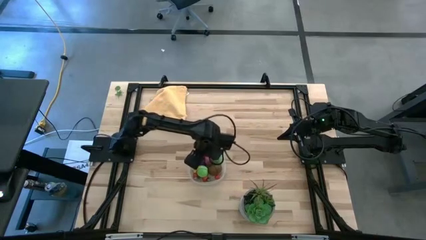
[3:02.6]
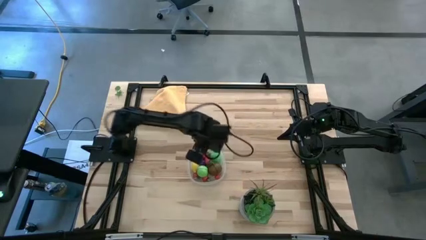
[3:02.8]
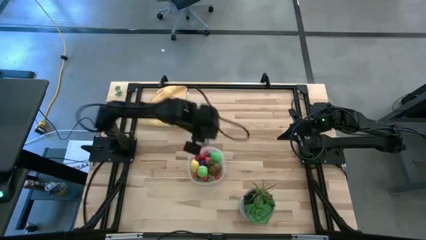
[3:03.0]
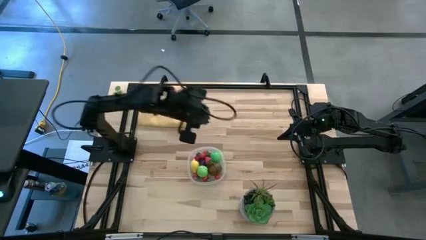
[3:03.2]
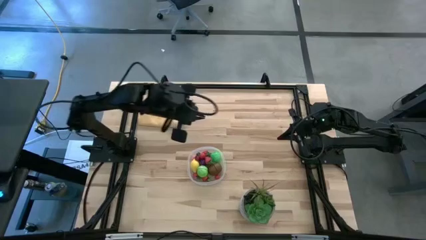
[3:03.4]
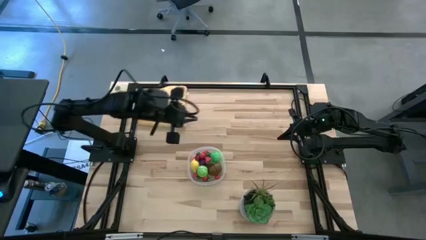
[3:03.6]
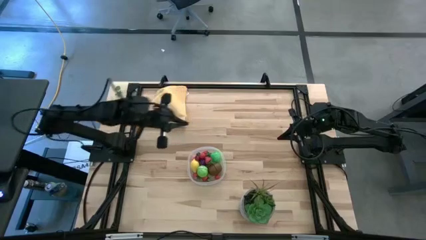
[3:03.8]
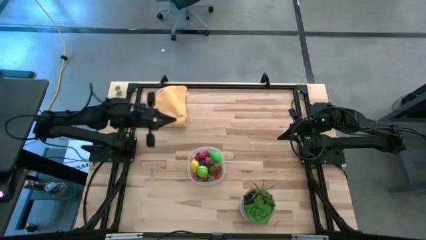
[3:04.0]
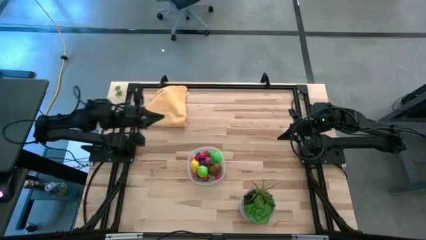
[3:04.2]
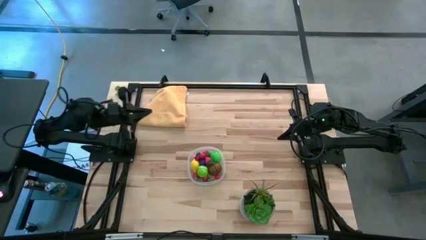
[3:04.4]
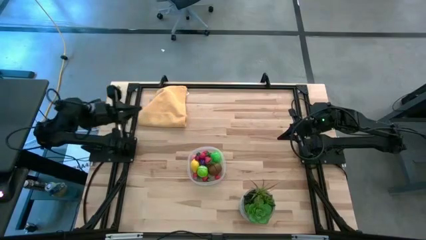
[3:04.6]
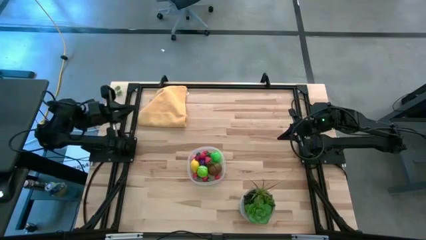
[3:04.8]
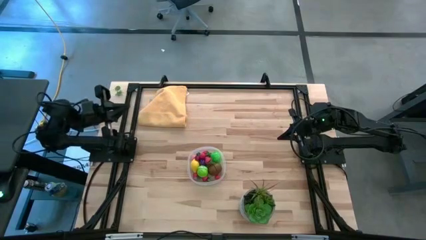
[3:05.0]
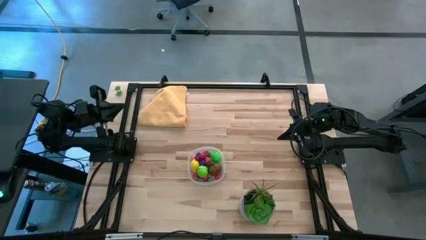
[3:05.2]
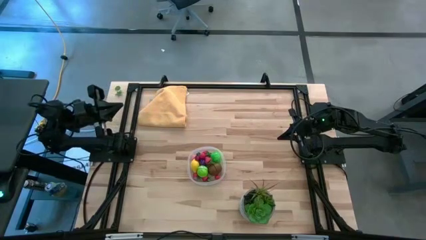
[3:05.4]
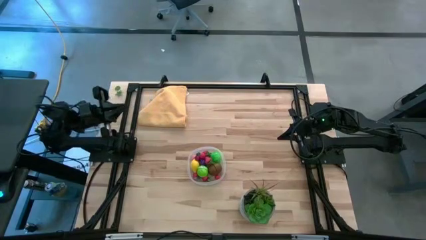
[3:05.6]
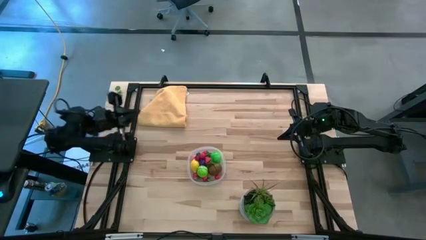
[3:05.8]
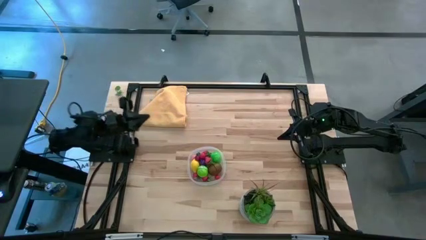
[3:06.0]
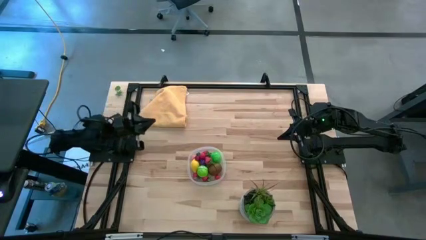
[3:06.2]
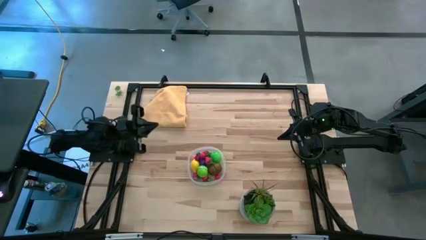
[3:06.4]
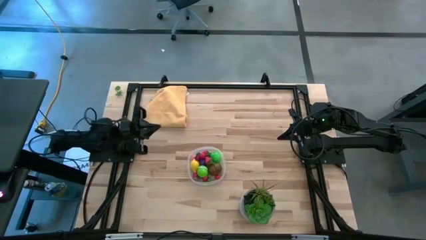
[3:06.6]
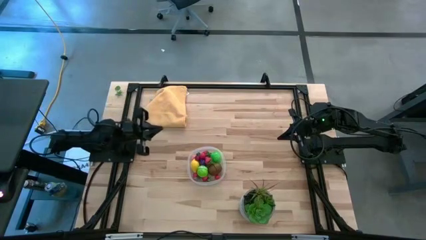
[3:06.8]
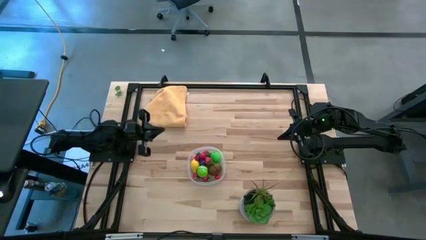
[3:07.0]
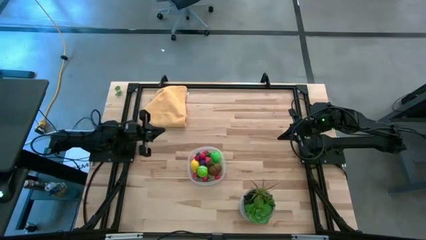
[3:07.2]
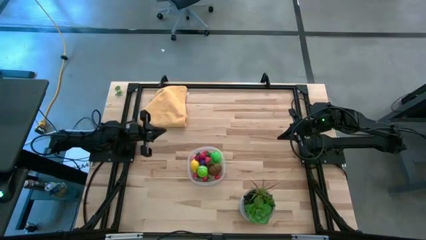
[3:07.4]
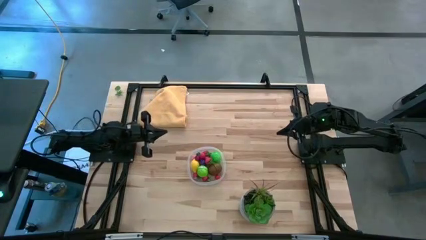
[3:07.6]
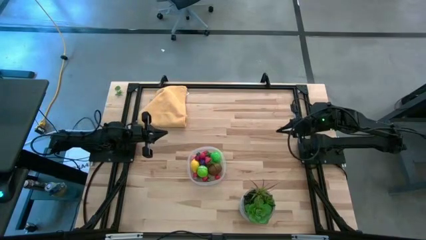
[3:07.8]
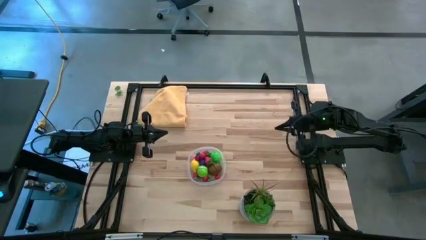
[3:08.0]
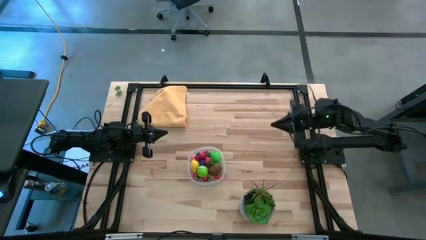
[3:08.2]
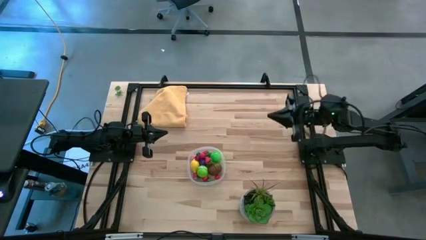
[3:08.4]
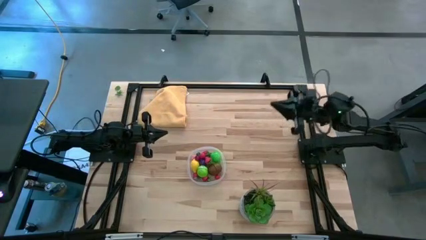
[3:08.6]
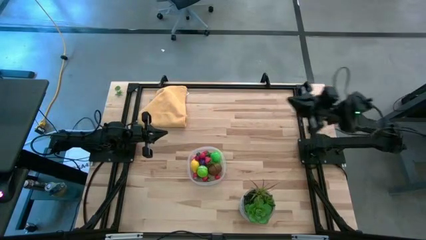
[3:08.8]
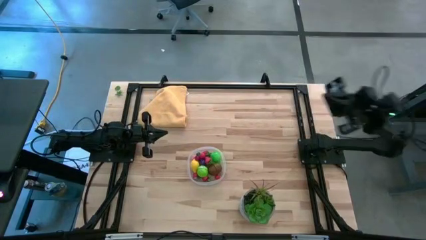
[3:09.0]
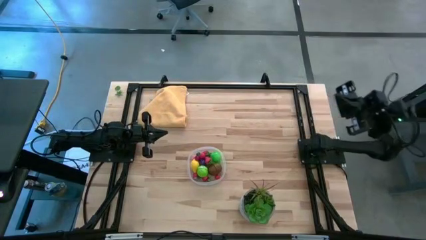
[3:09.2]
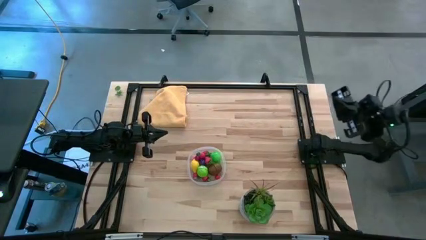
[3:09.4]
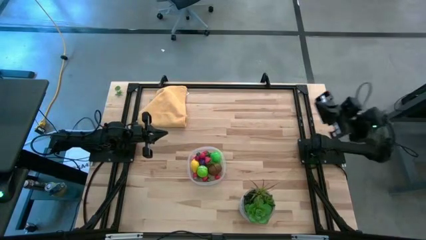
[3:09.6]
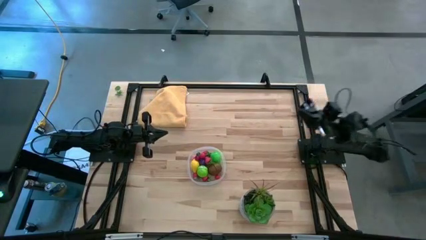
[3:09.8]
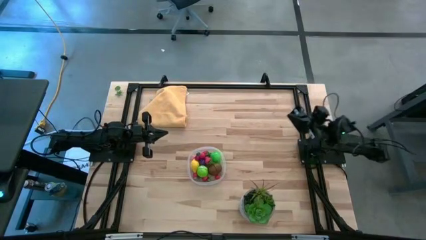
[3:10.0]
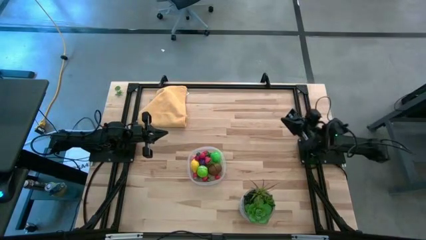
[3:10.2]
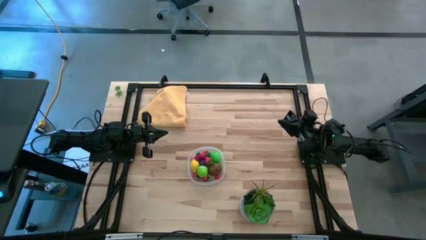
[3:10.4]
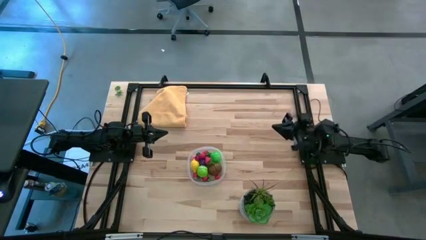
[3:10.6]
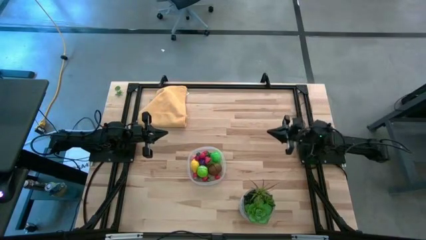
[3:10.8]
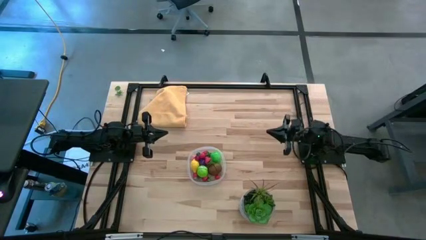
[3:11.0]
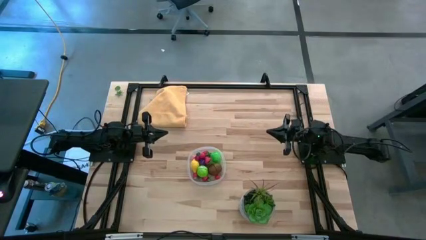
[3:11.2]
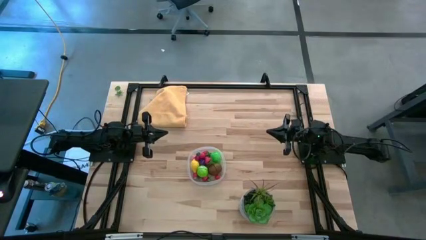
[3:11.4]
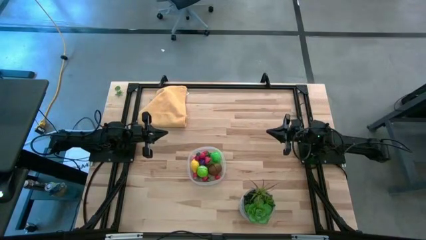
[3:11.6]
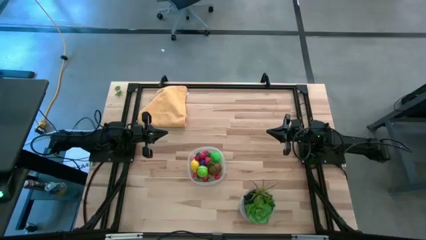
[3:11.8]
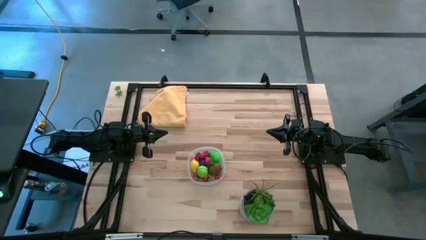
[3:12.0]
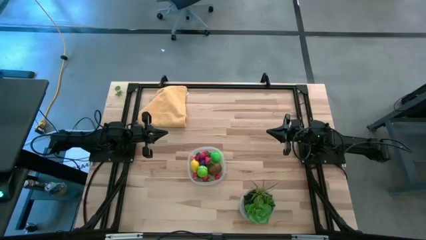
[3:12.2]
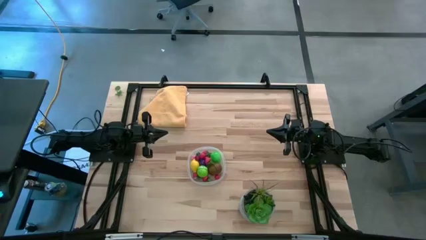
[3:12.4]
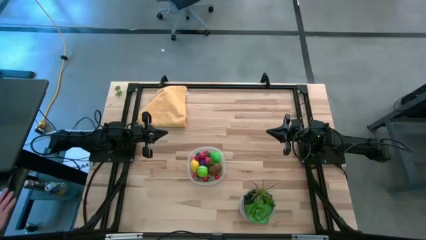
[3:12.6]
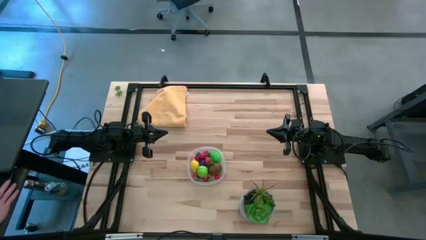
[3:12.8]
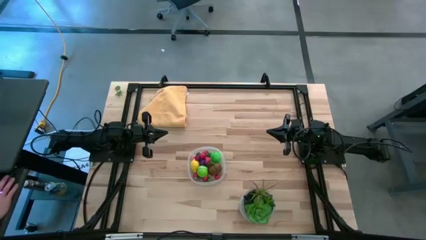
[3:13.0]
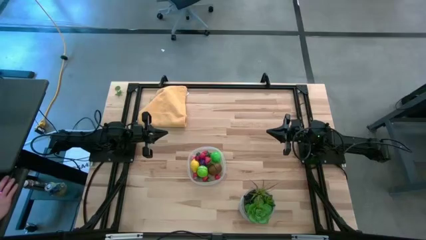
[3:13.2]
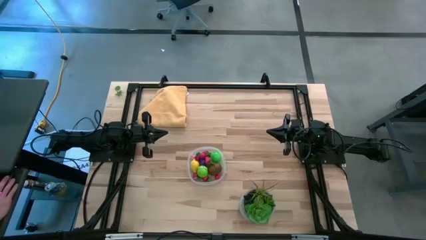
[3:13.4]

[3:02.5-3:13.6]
Task: Pick and placing Produce into tupperware
Return to Home Position

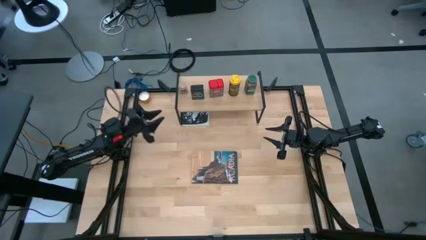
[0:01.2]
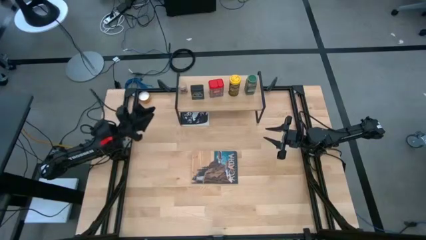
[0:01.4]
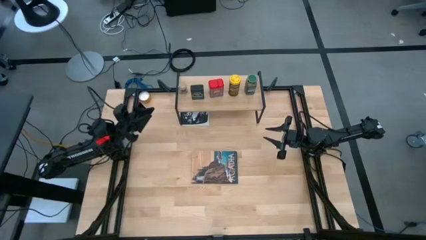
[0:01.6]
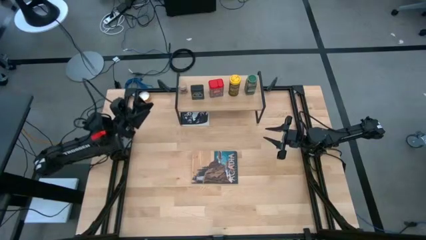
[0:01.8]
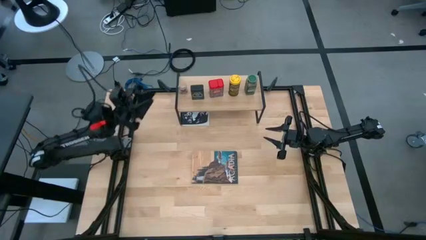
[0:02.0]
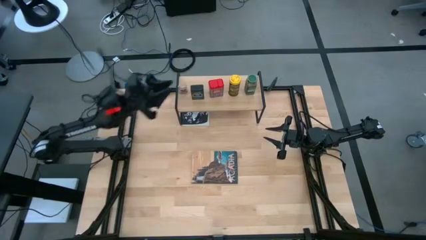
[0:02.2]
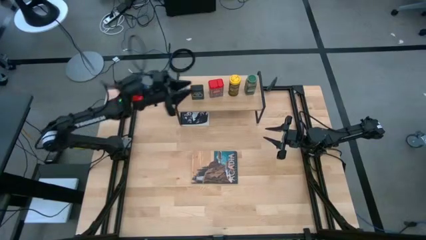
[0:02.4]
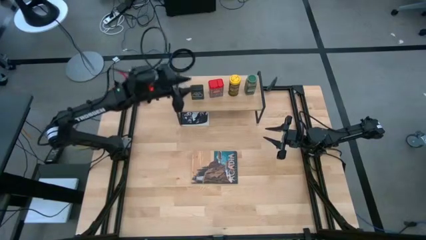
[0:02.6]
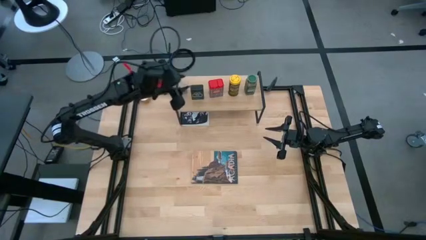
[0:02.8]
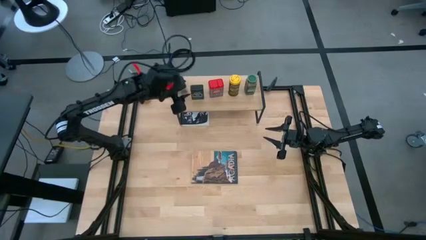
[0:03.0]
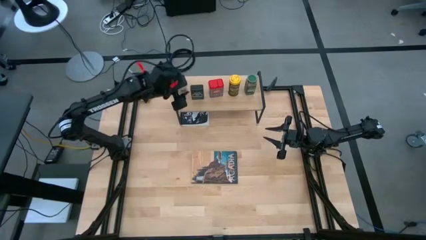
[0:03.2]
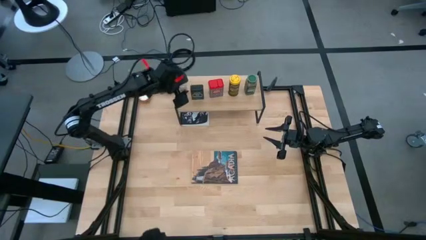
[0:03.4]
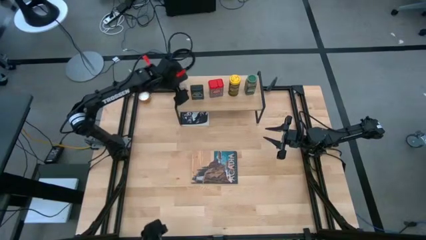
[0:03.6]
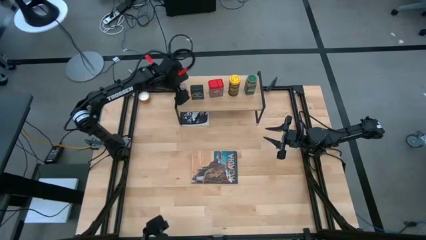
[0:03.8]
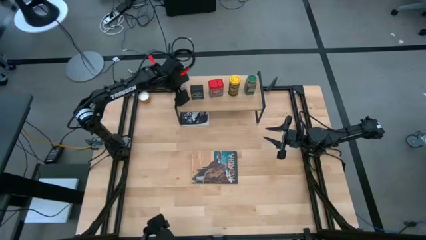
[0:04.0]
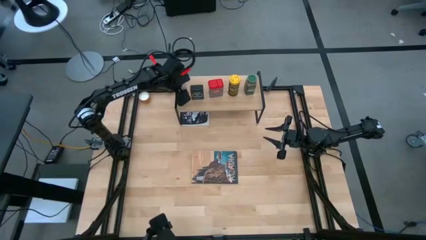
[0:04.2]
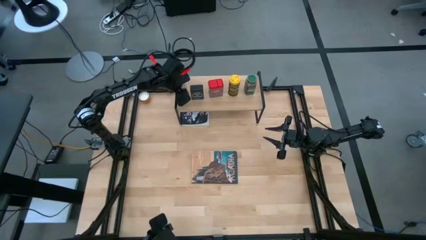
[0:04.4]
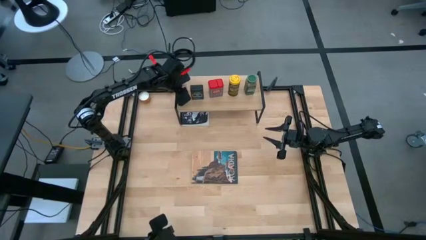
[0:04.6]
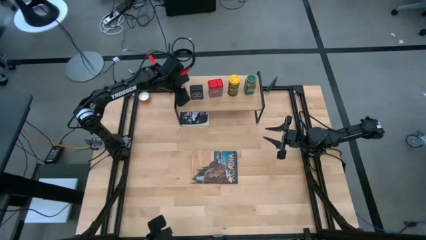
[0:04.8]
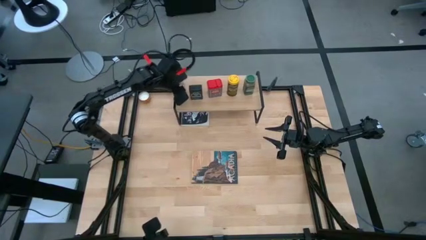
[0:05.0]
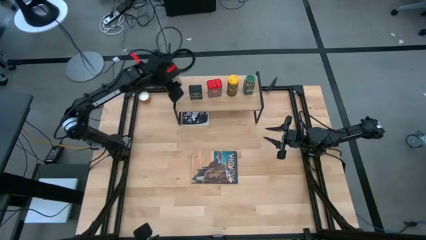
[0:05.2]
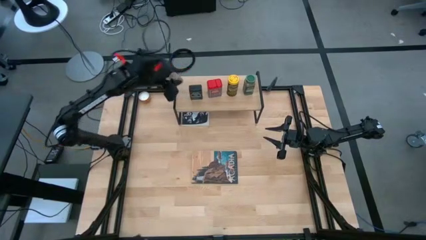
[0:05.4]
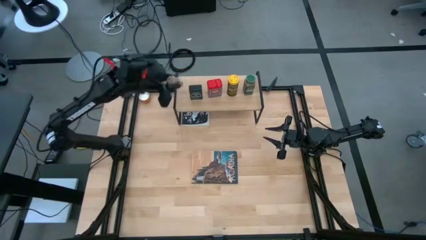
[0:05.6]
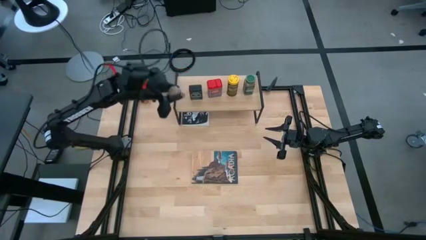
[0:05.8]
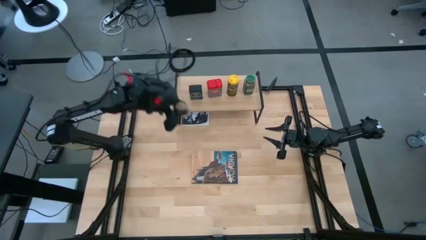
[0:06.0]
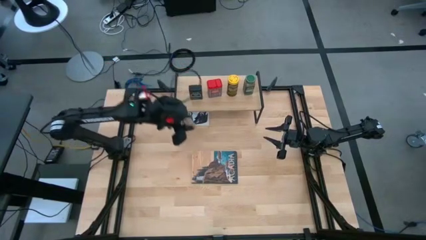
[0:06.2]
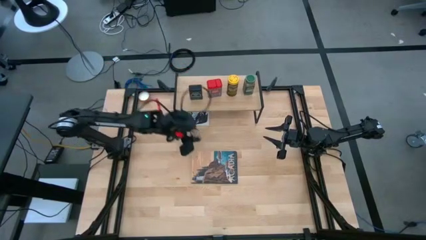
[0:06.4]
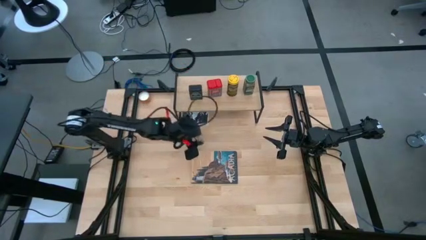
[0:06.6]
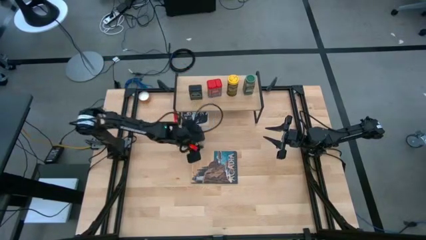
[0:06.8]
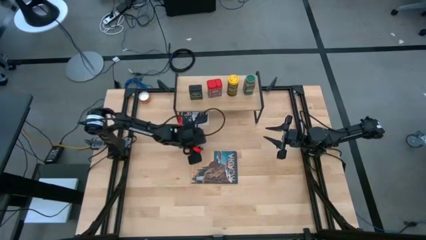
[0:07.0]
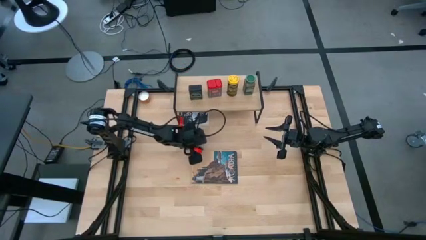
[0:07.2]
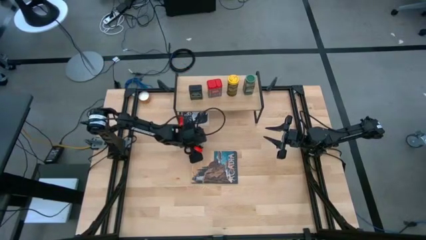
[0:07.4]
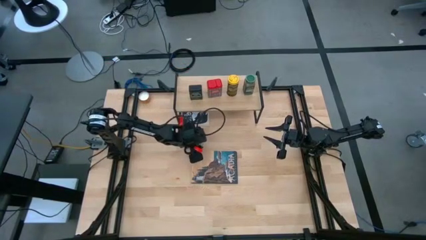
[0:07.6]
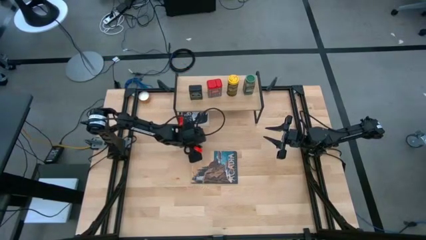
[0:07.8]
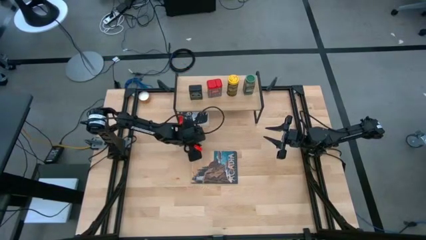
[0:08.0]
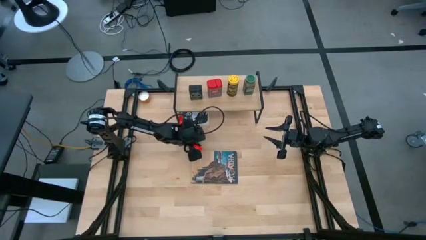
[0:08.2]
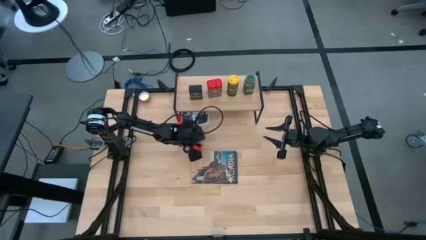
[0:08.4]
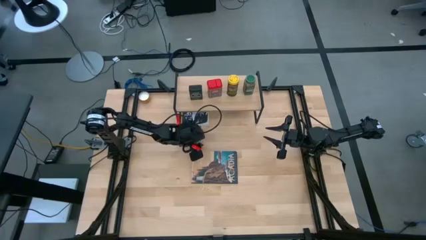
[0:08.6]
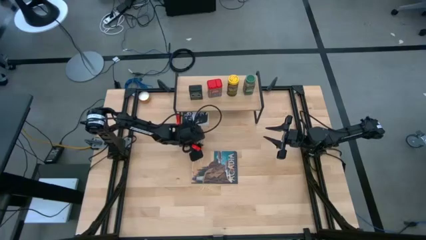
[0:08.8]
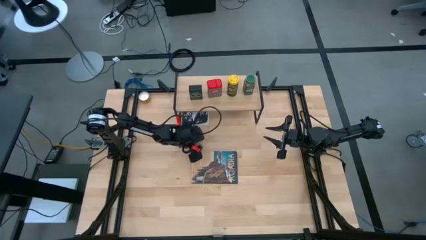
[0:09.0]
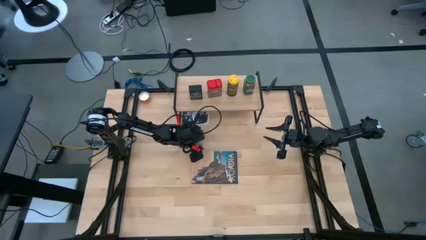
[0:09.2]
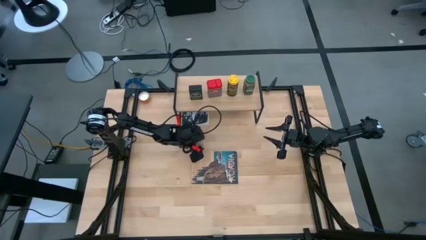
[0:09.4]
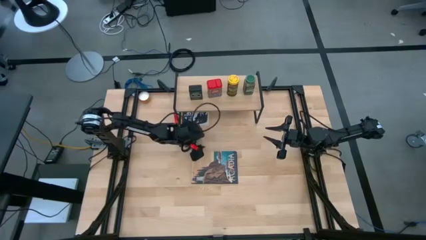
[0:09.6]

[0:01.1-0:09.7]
Task: Shelf spices
Remove the brown seasoning bottle from the shelf
